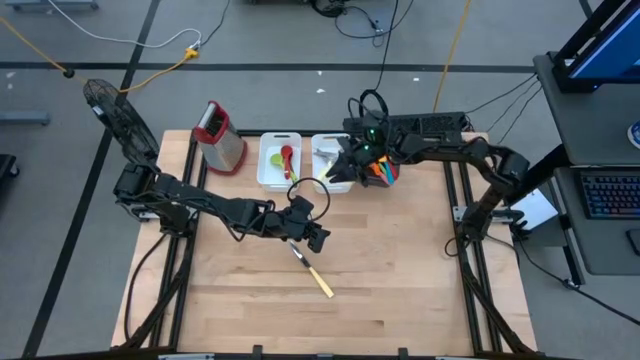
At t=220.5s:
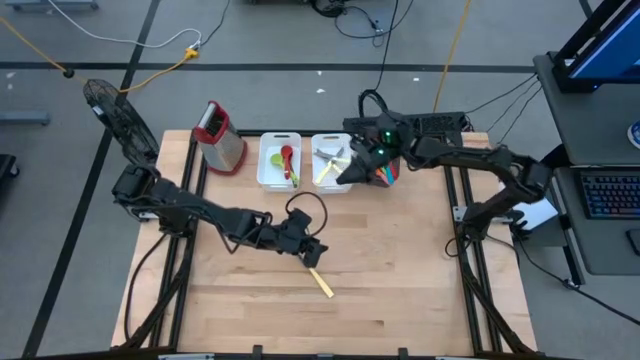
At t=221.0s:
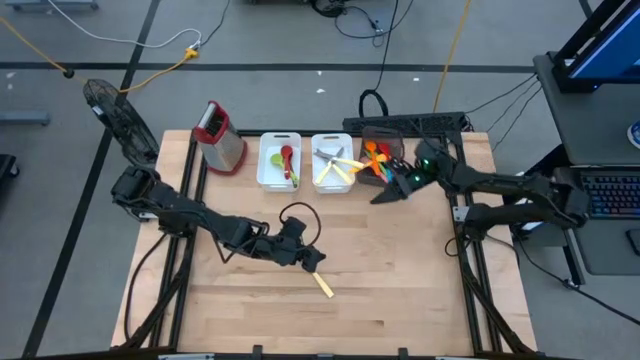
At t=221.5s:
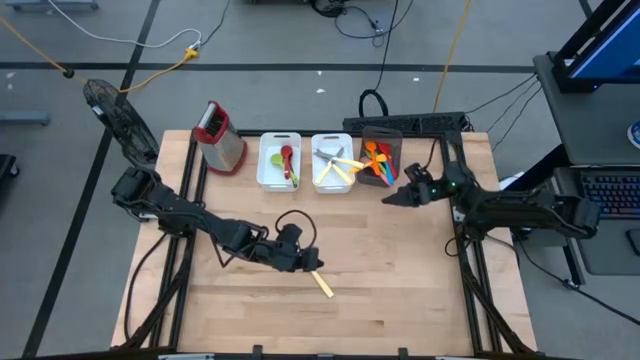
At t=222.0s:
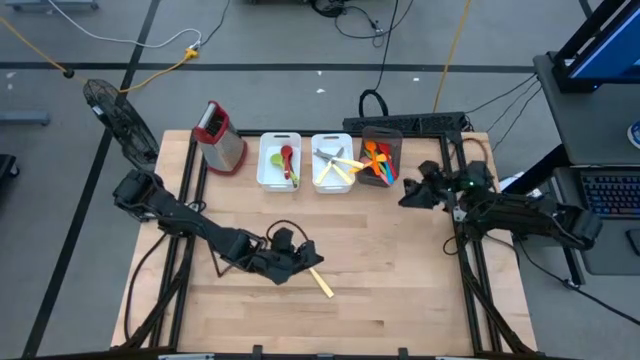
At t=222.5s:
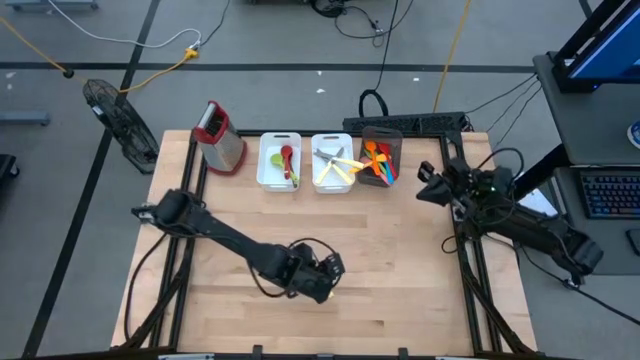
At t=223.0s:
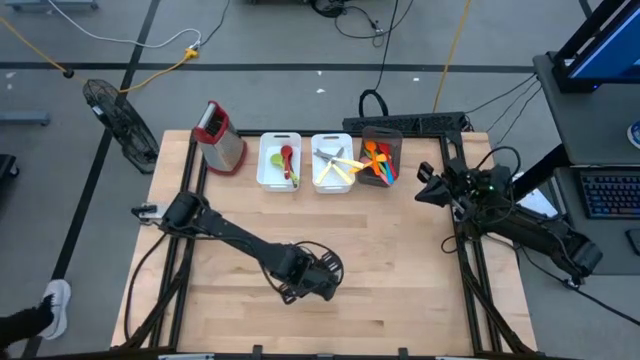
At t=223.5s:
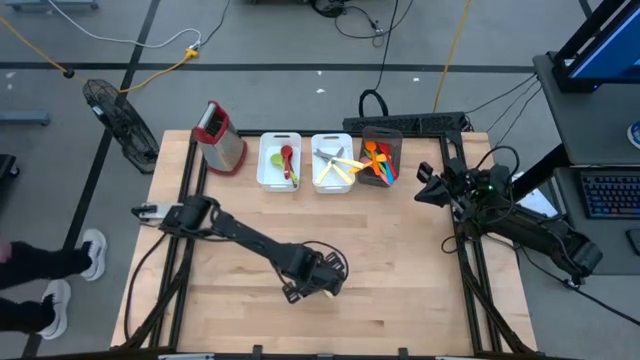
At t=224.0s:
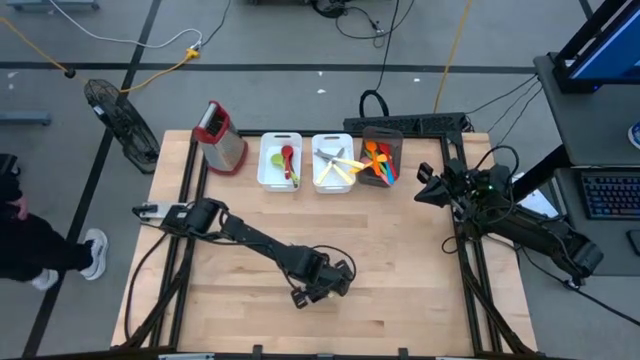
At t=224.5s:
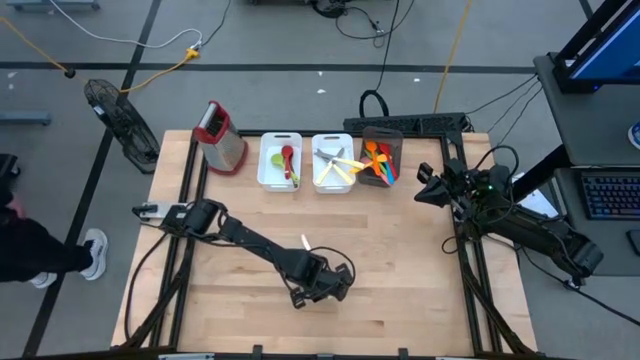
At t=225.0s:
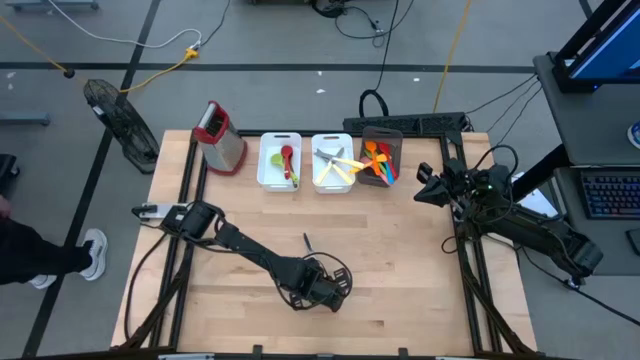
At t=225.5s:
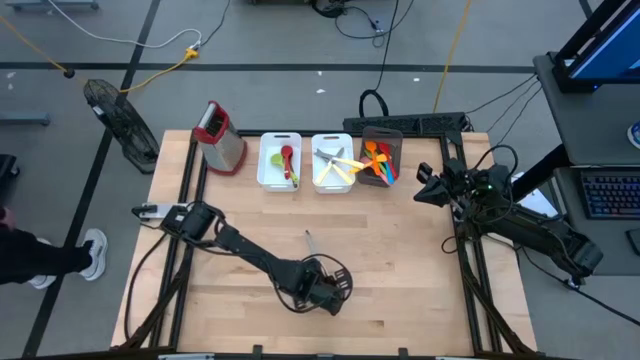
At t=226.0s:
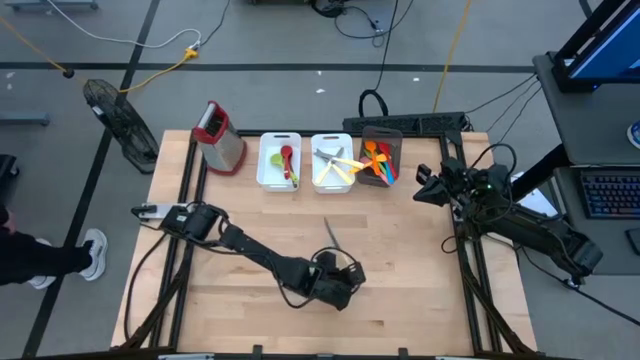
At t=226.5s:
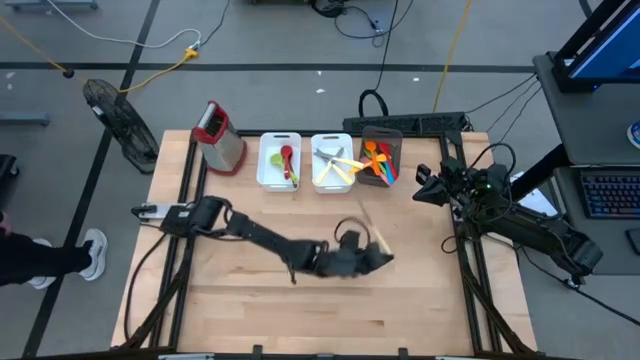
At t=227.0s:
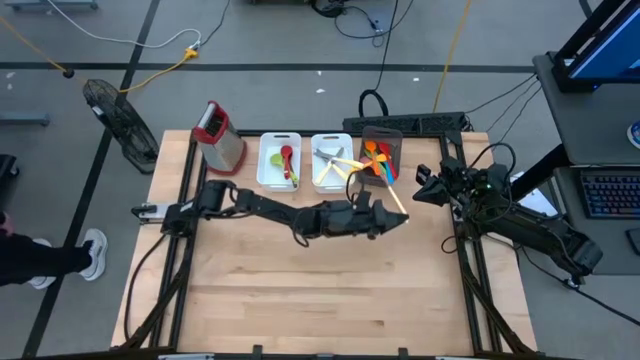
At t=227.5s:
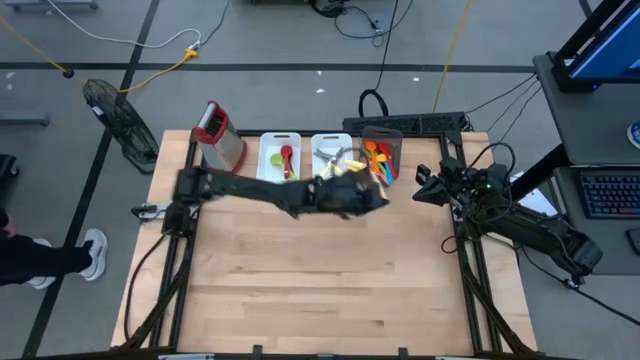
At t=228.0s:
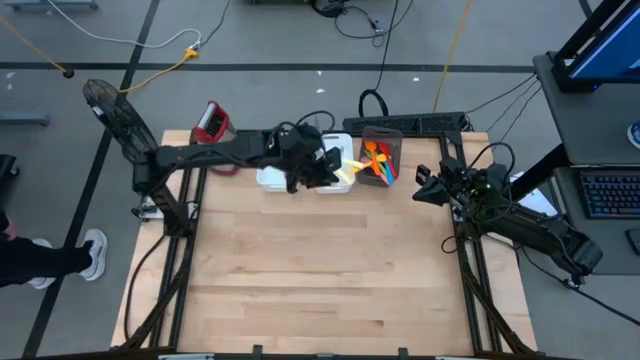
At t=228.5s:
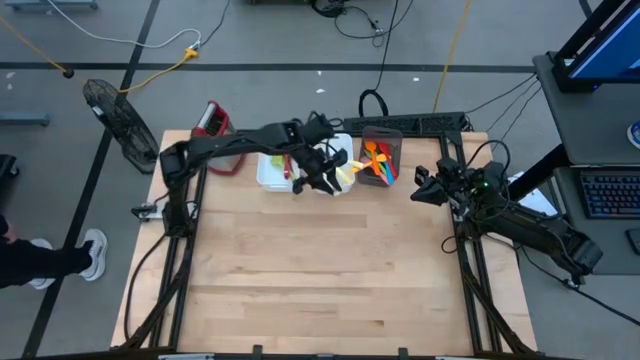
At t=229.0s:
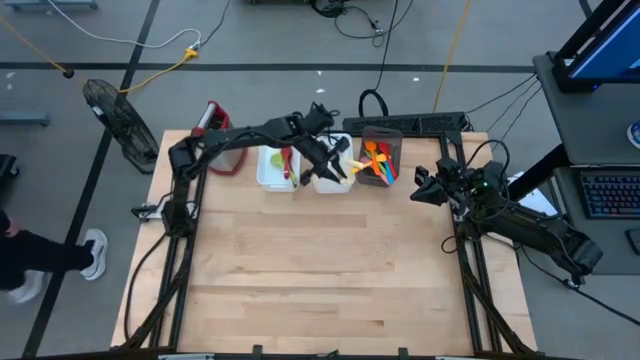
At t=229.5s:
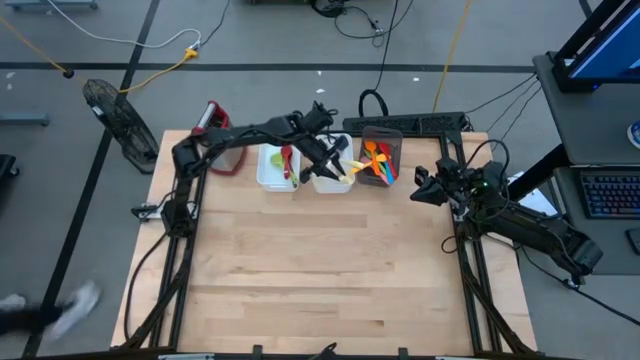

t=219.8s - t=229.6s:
Task: Pick & Place Kitchen Items
Put the yellow knife into the right white bin

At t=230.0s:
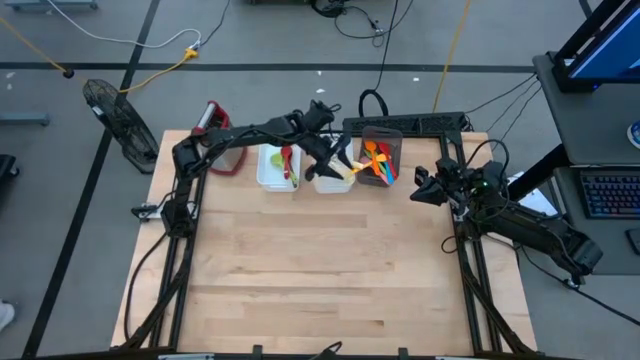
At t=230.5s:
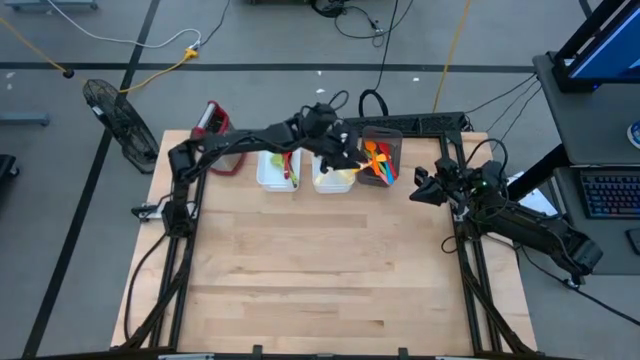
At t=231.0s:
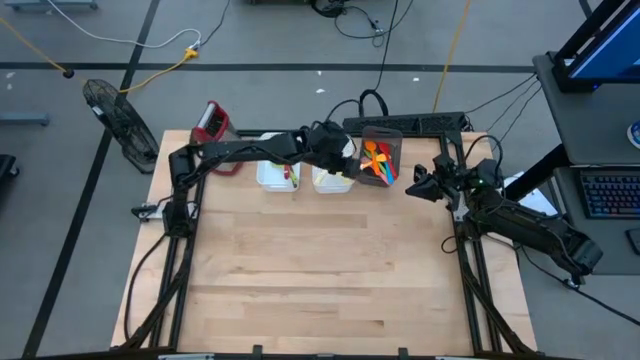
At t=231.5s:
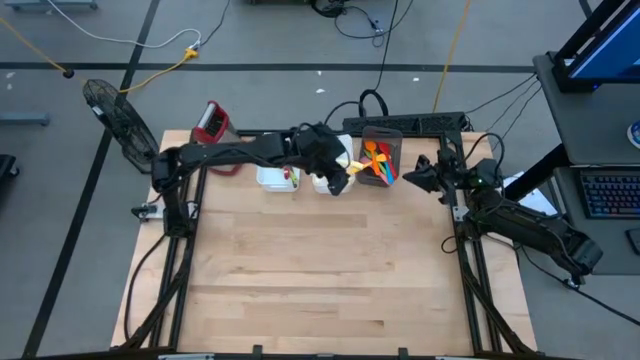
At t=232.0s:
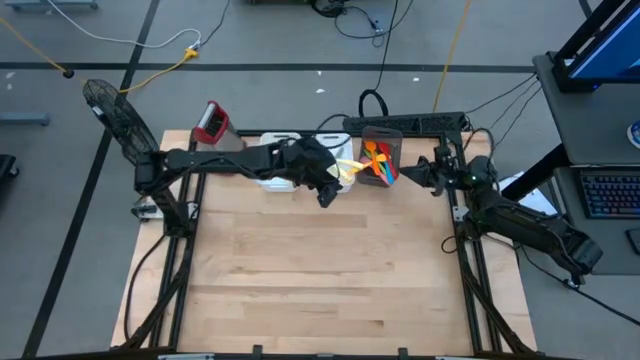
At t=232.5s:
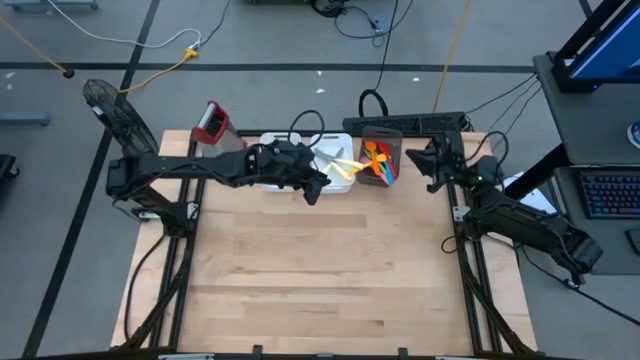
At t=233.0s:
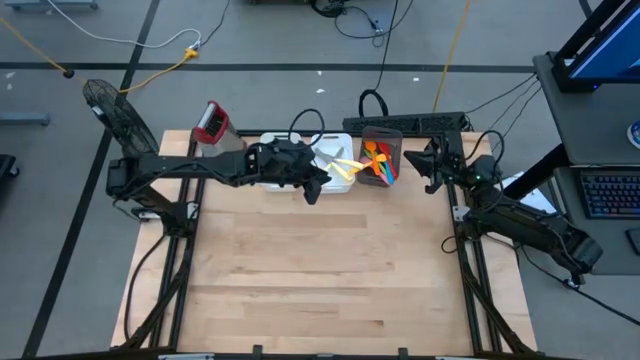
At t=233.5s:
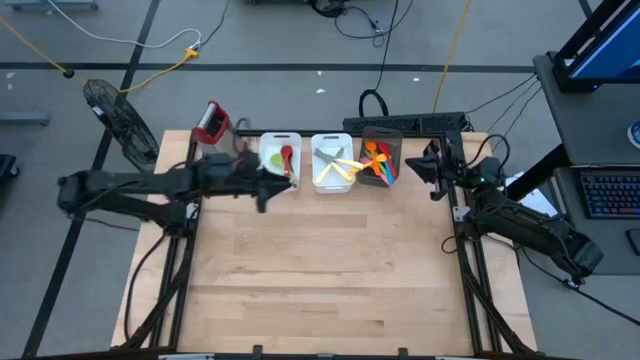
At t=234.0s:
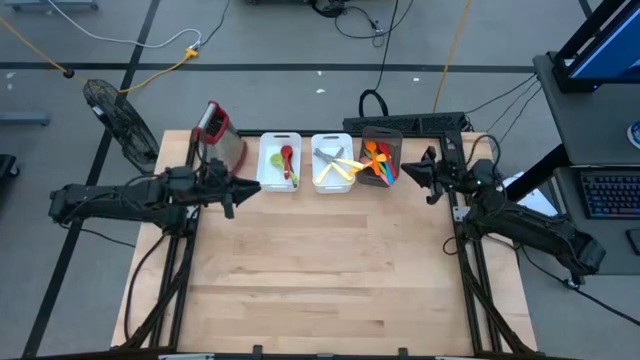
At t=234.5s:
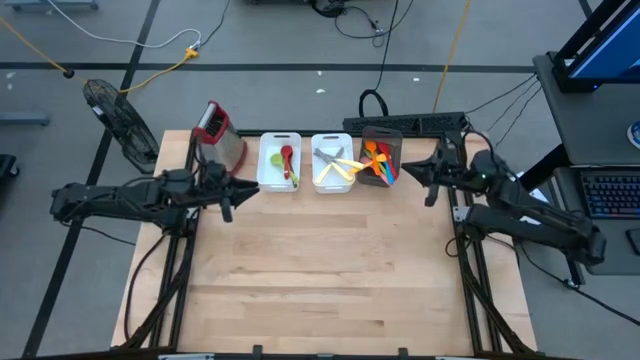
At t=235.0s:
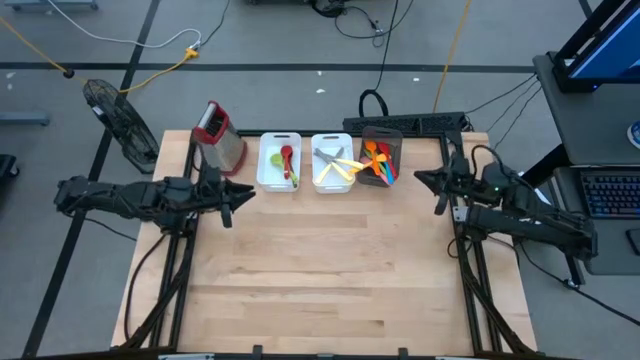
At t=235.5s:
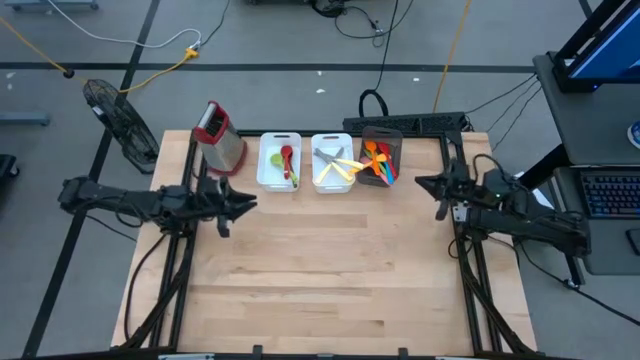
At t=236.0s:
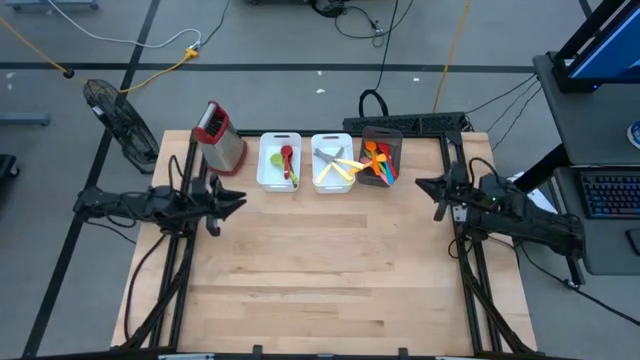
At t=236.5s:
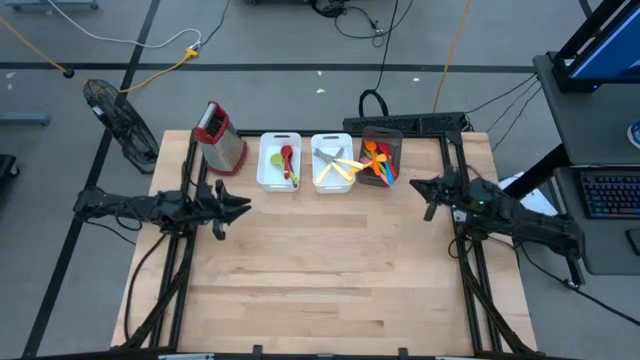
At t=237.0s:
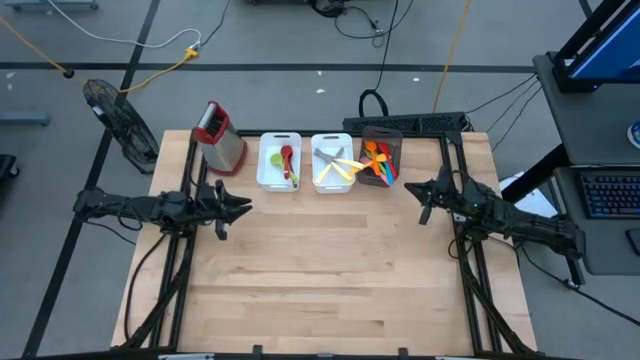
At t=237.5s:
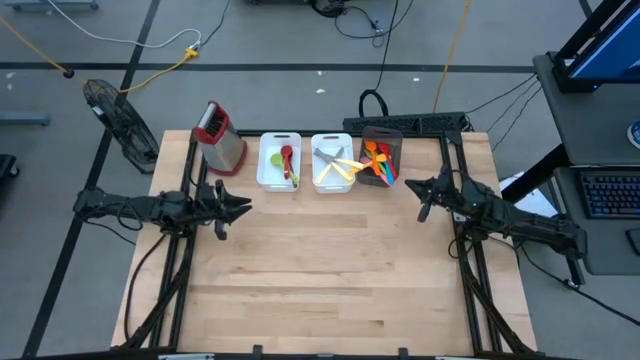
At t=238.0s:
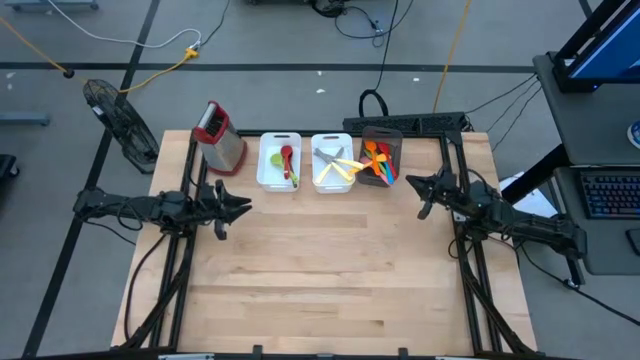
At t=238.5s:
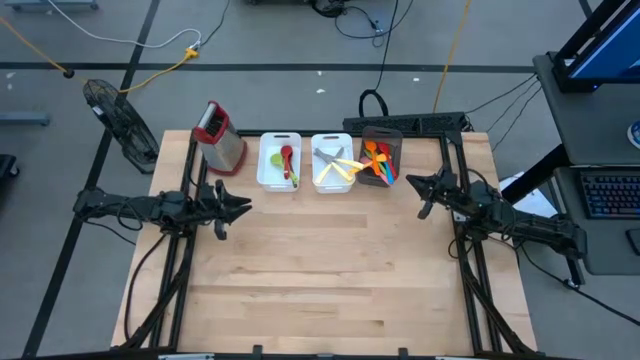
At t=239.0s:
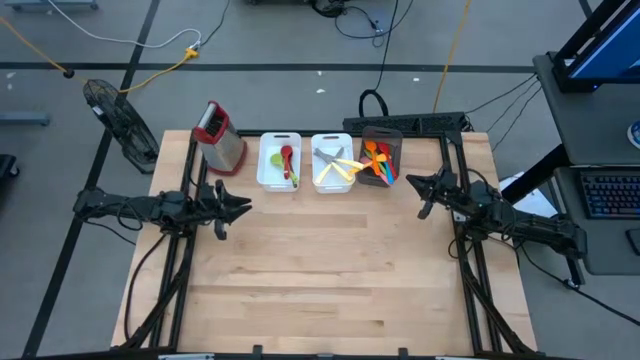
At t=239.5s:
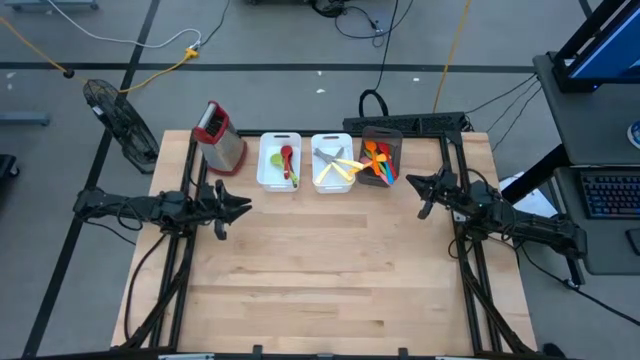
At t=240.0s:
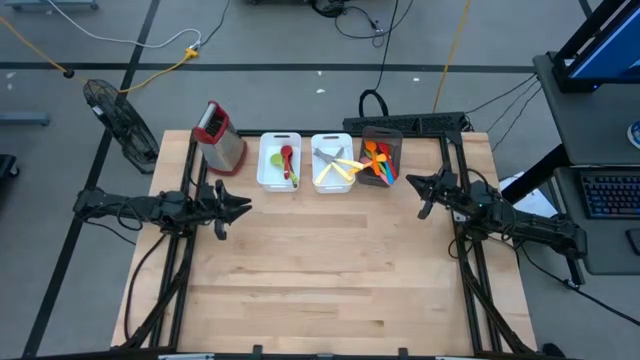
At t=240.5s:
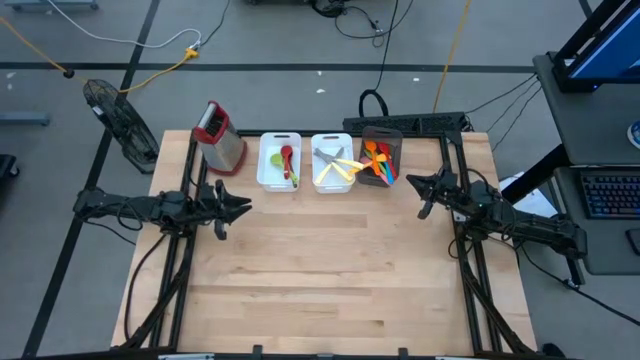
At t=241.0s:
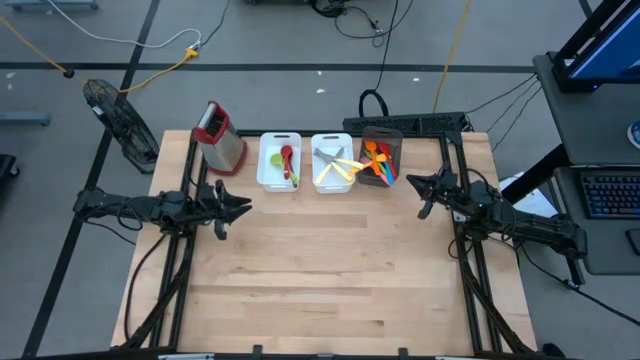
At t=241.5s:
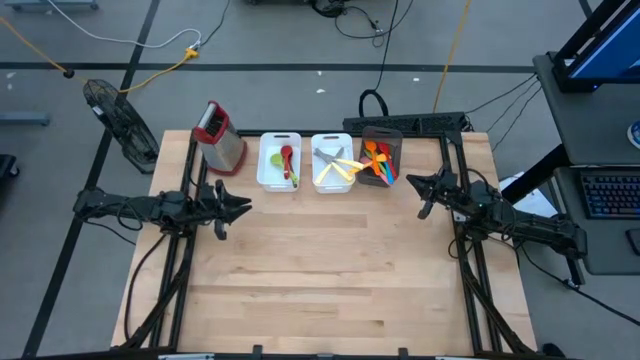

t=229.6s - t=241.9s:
Return to Home Position
